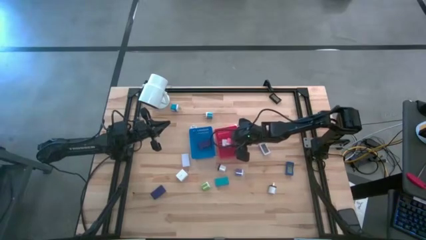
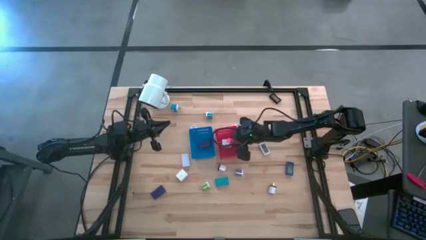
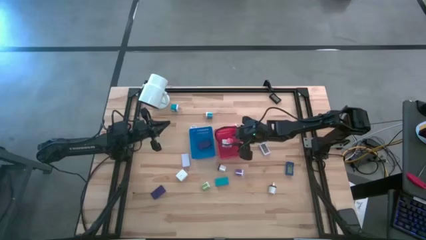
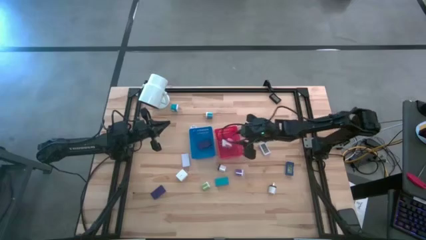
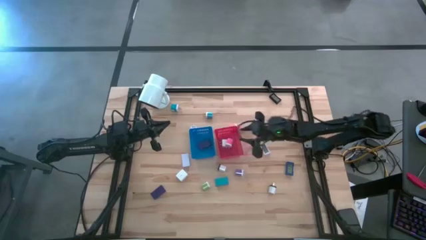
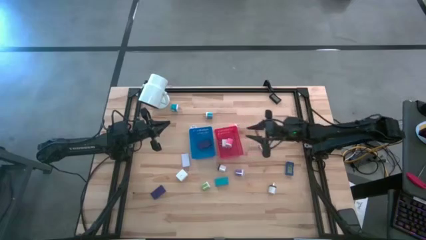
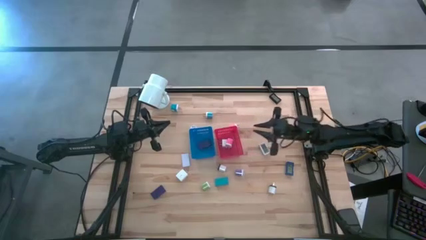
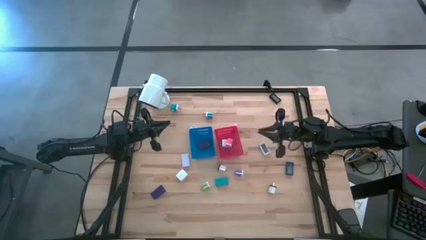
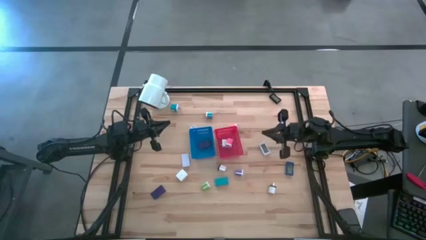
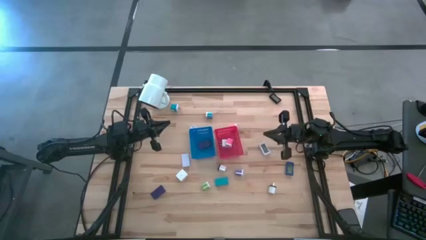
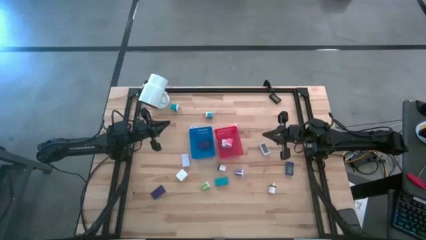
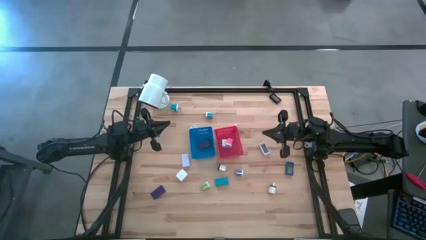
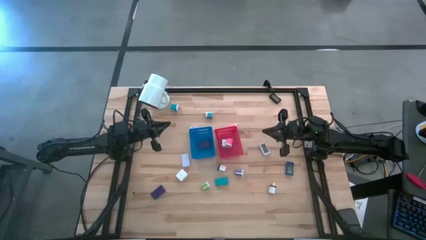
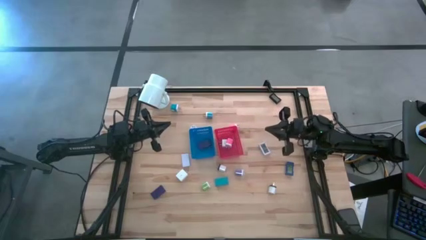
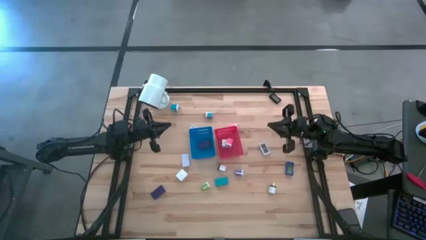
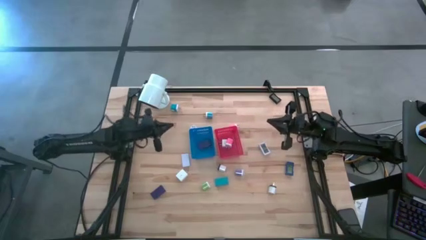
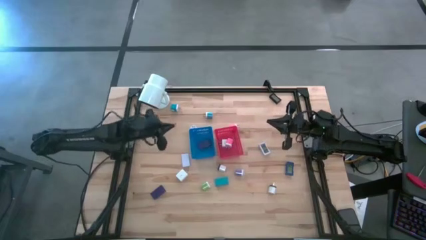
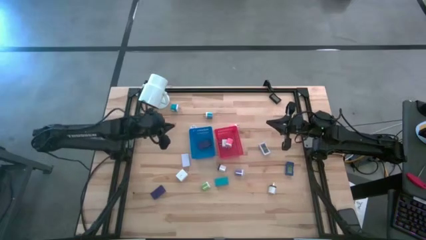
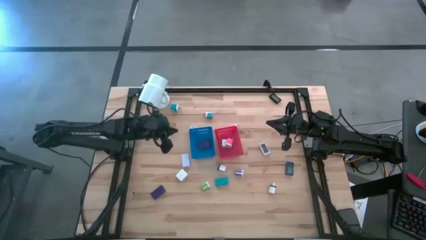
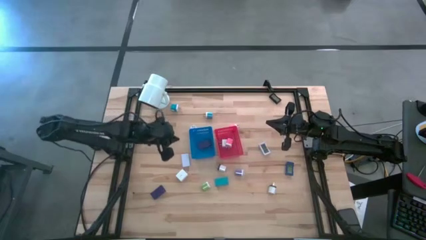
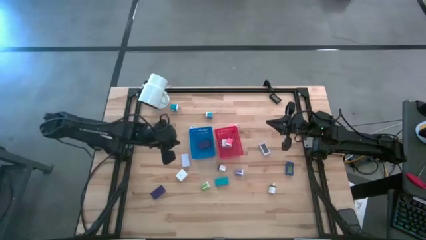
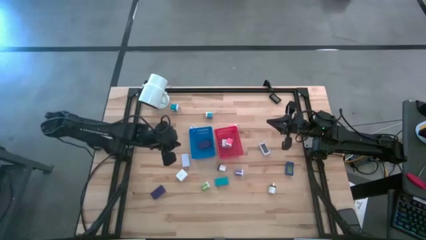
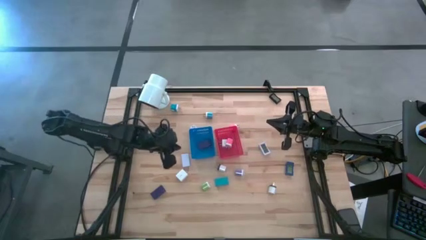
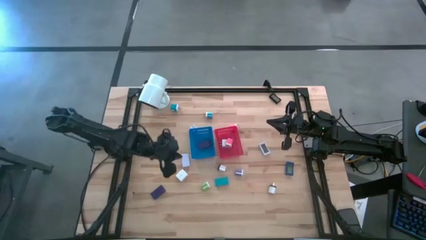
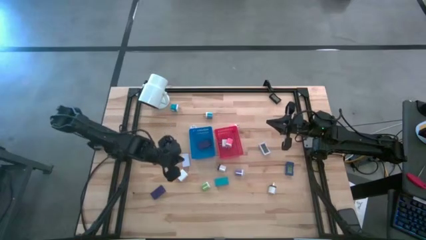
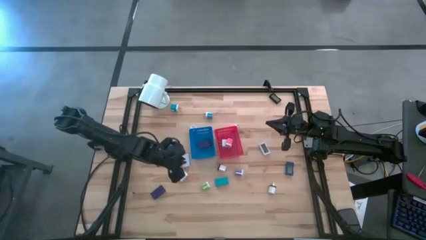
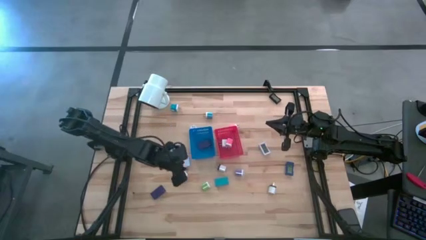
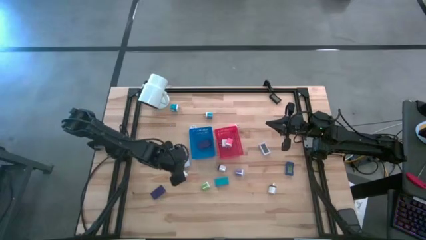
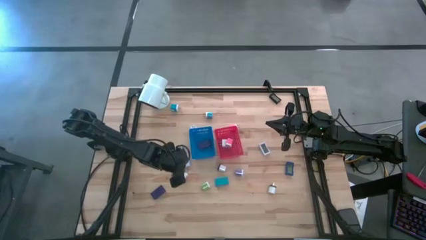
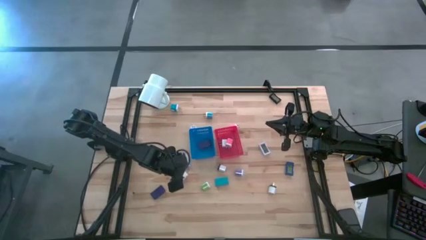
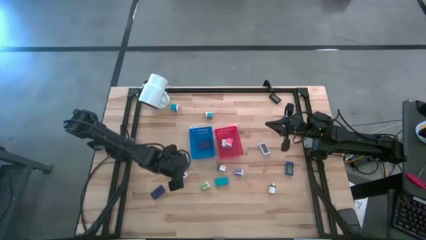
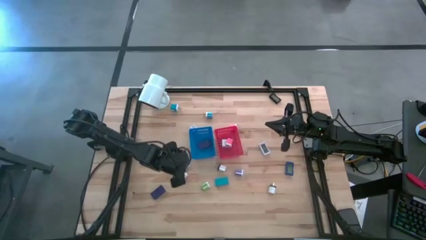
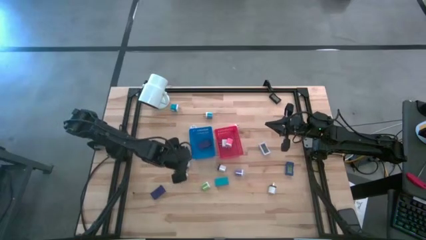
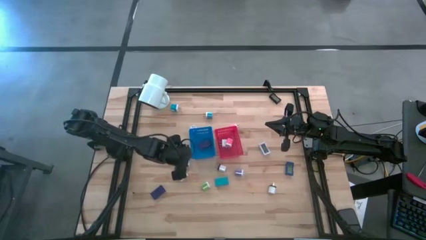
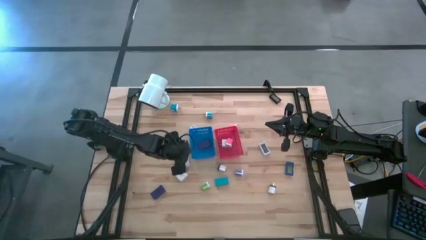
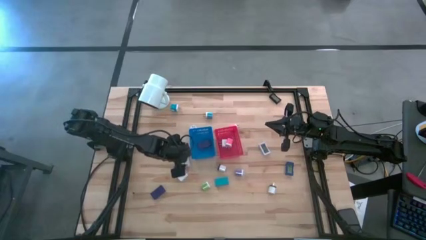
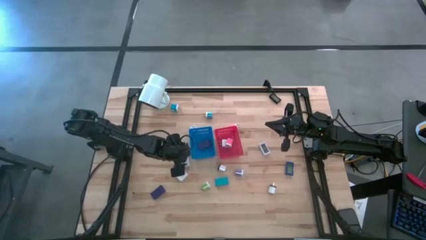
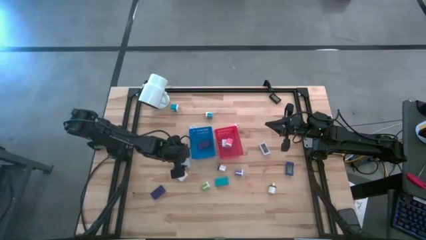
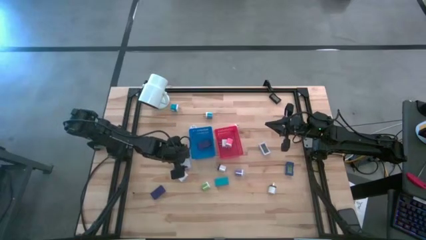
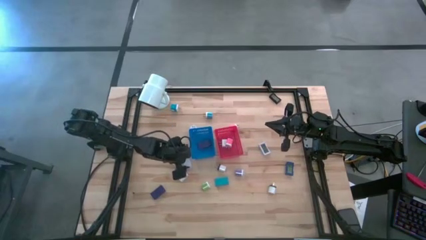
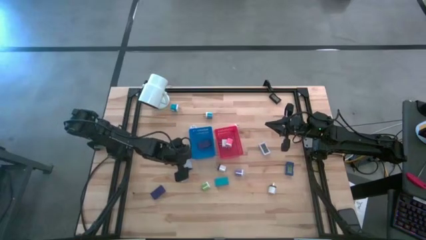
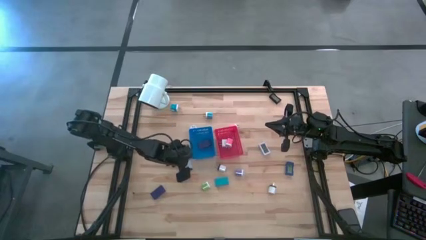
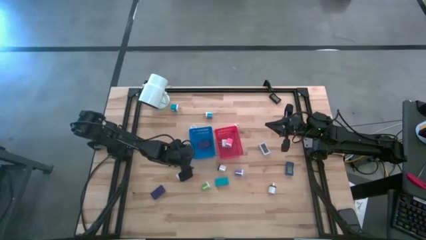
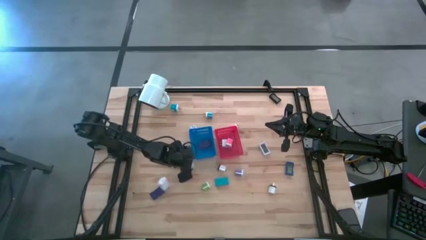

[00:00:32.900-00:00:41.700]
Task: Pick & Place Office items
Put the white digital clock into the blue bin

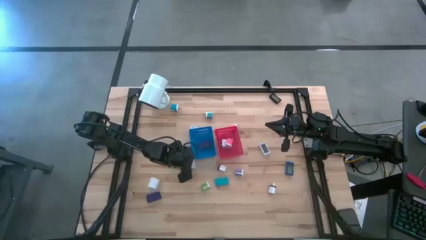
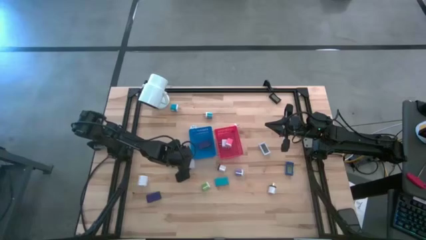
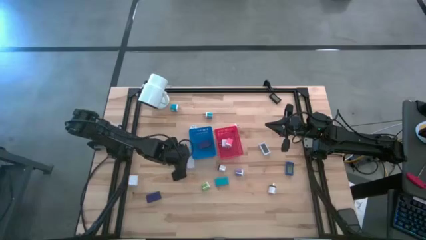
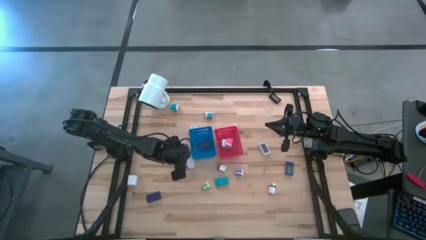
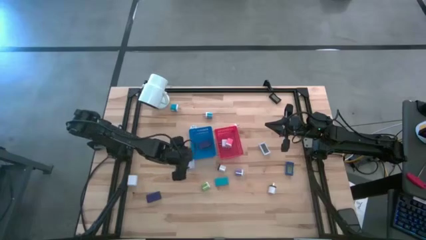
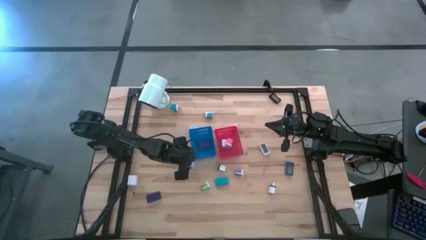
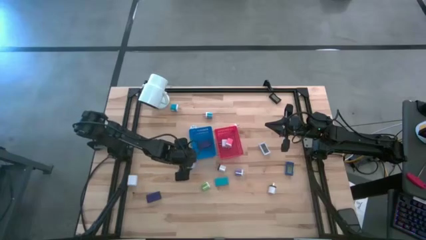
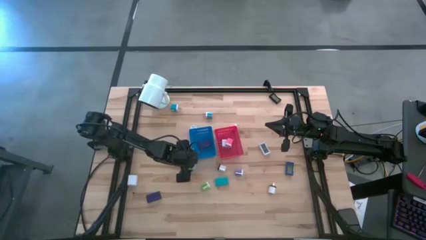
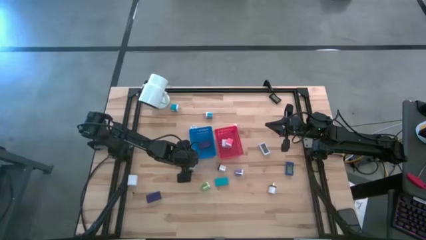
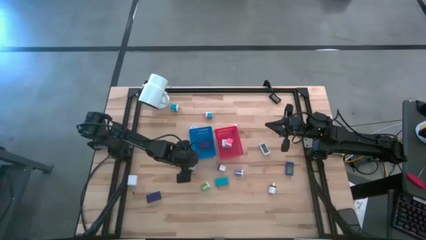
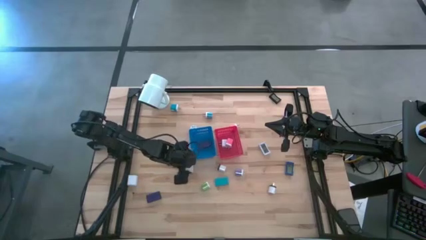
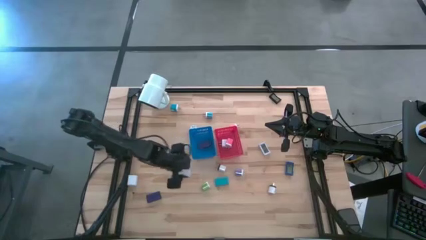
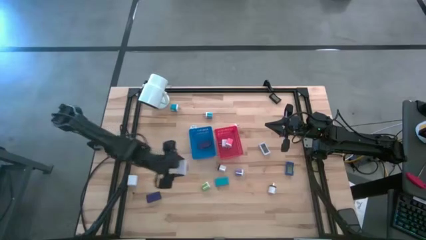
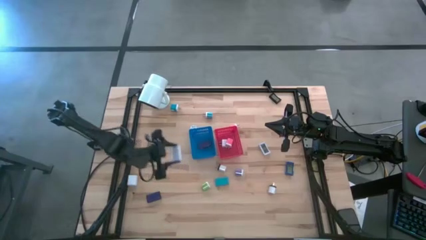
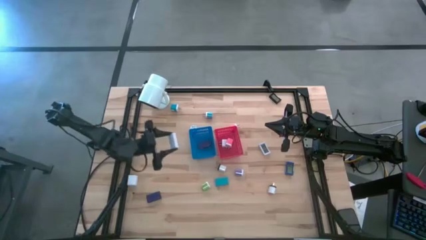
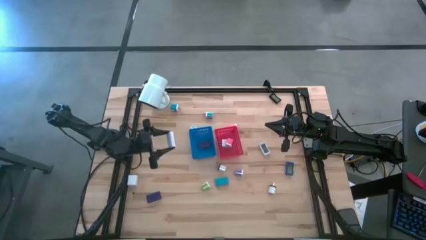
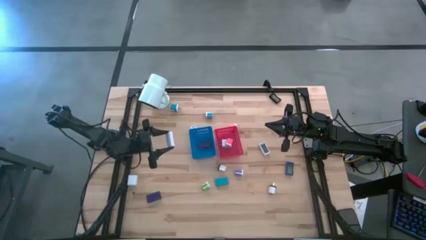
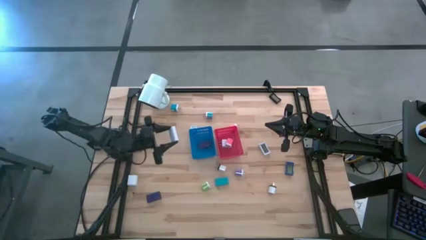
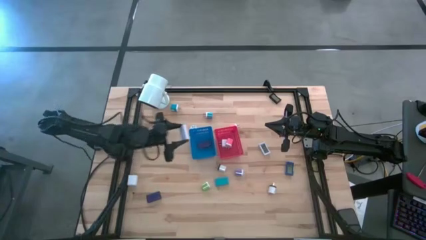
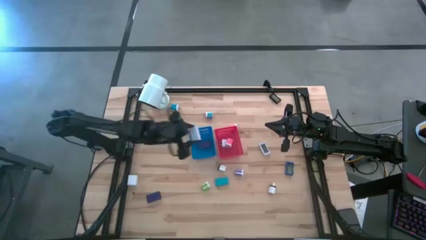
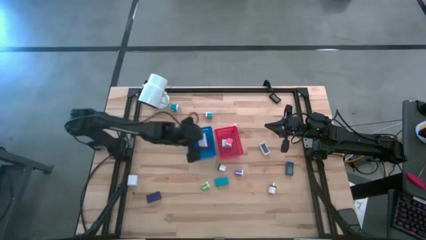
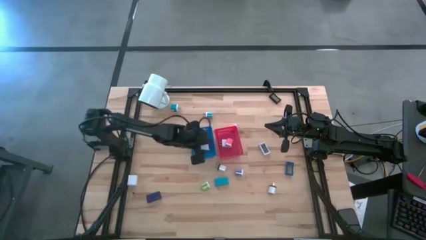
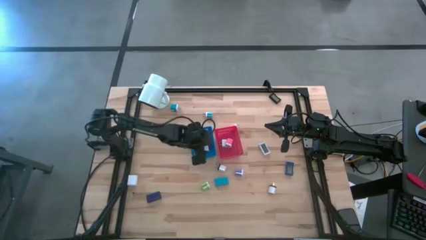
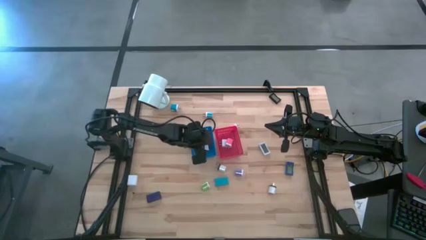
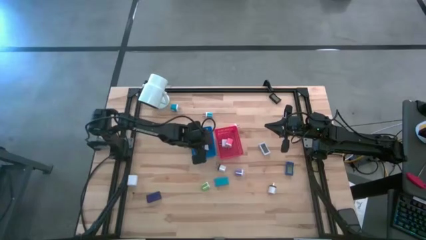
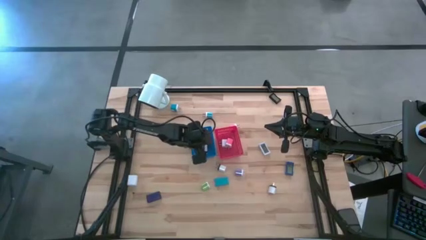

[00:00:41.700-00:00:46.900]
Put the left white digital clock into the blue bin
